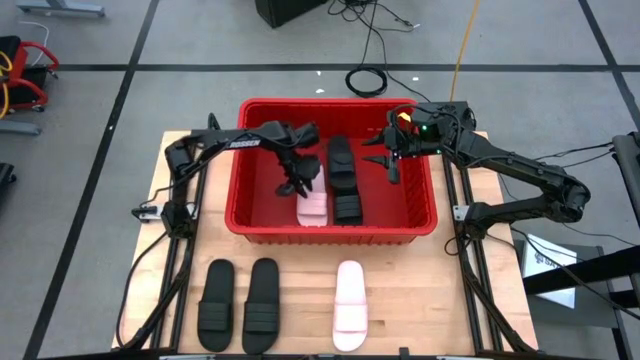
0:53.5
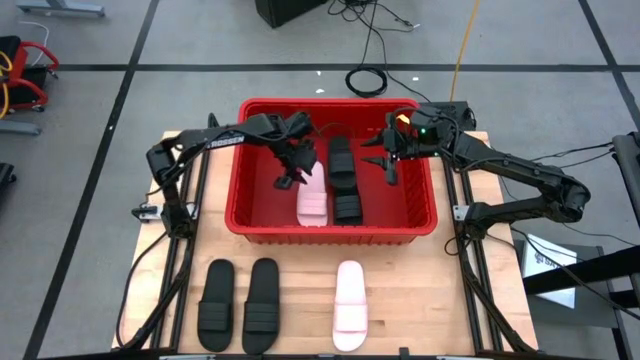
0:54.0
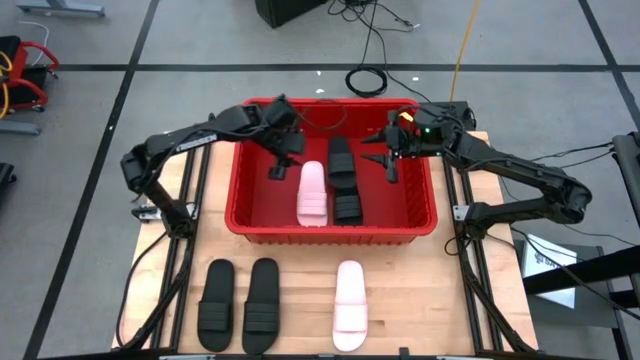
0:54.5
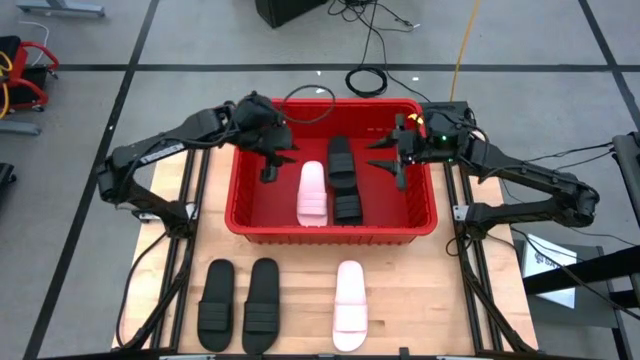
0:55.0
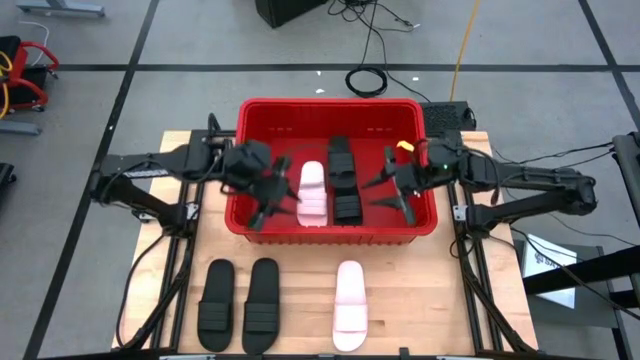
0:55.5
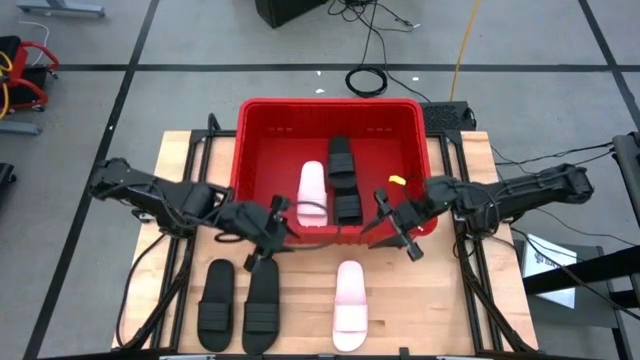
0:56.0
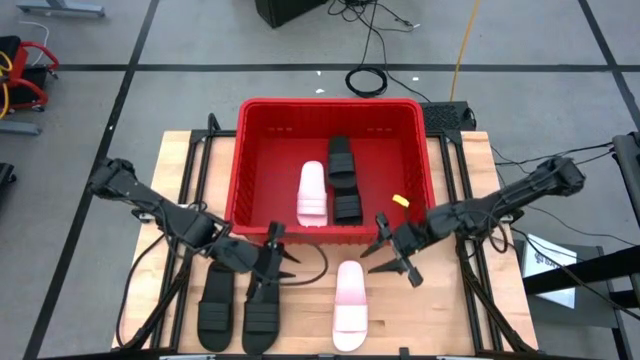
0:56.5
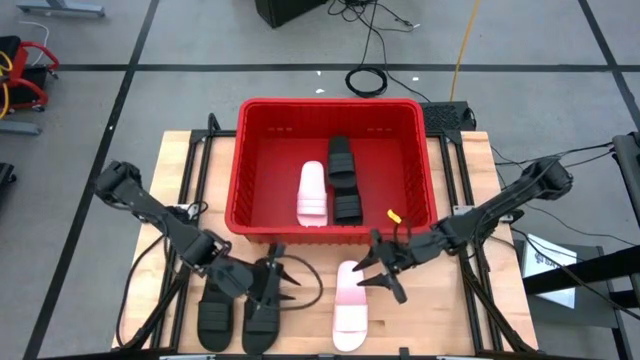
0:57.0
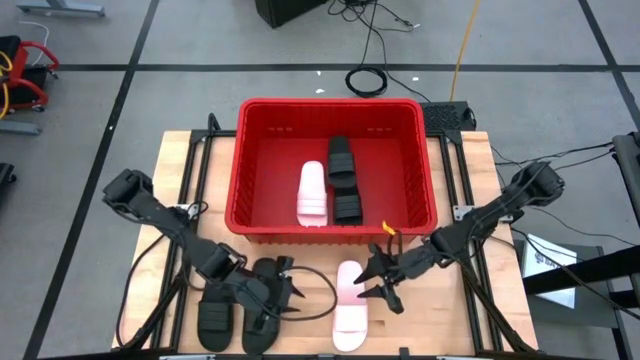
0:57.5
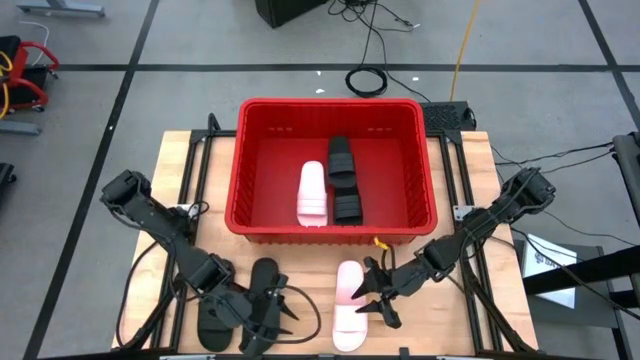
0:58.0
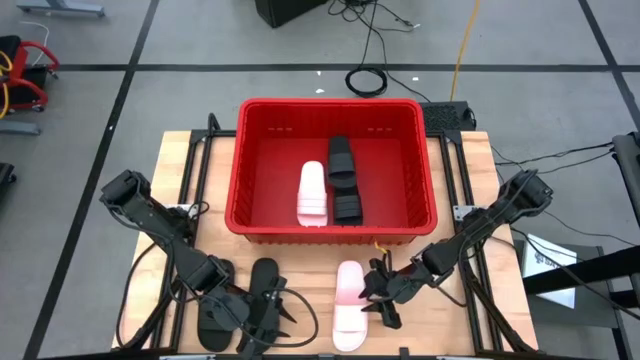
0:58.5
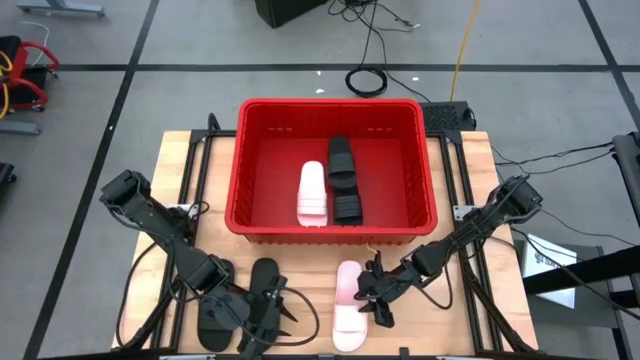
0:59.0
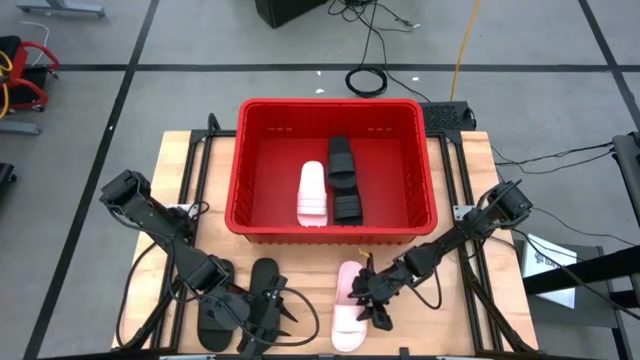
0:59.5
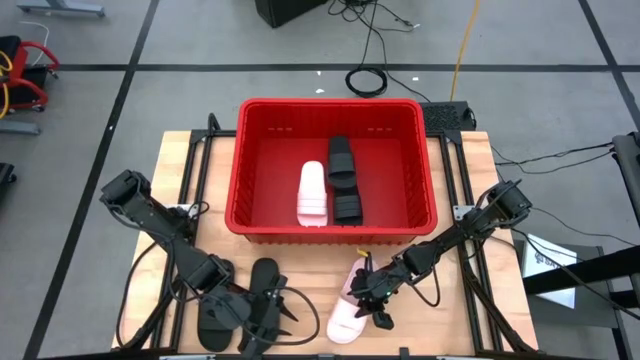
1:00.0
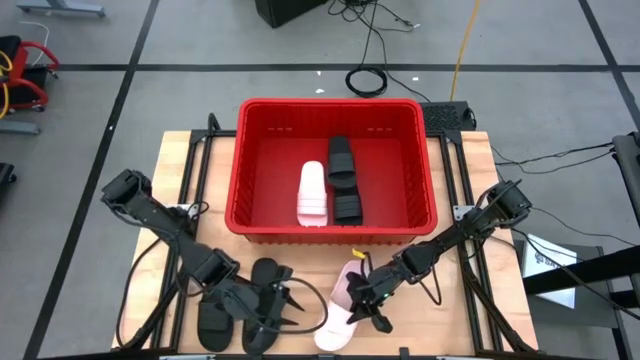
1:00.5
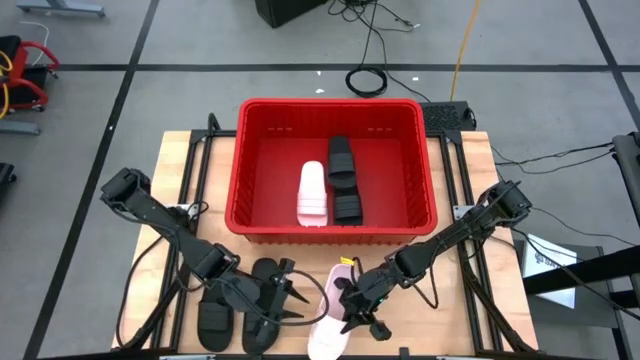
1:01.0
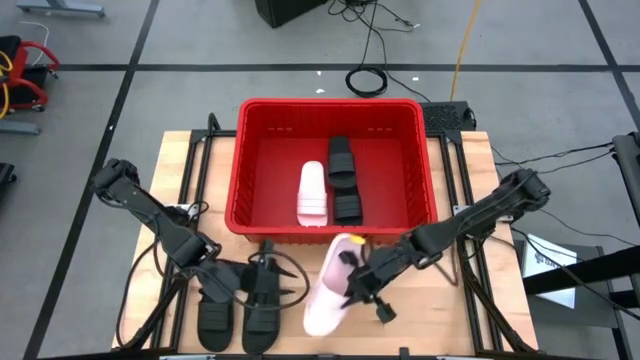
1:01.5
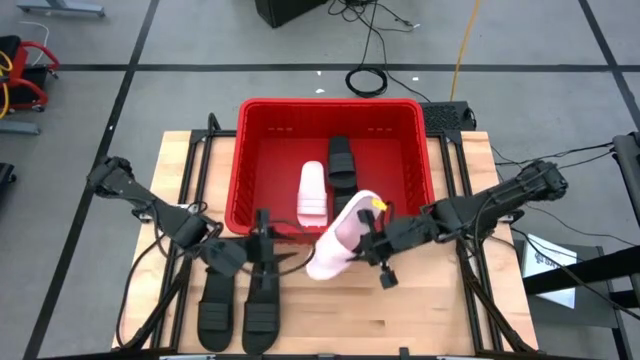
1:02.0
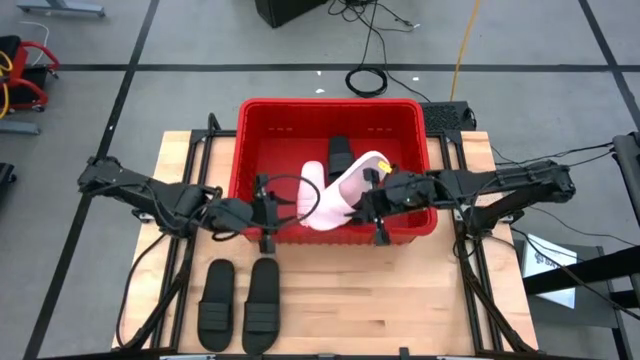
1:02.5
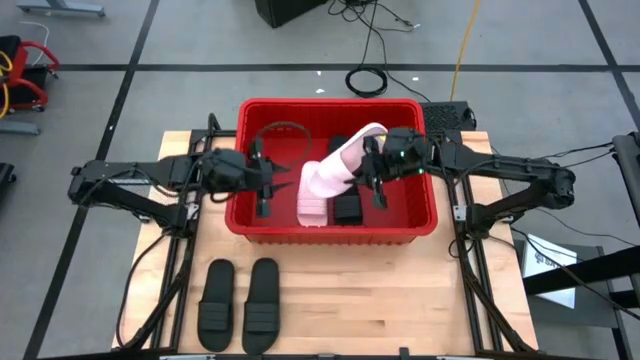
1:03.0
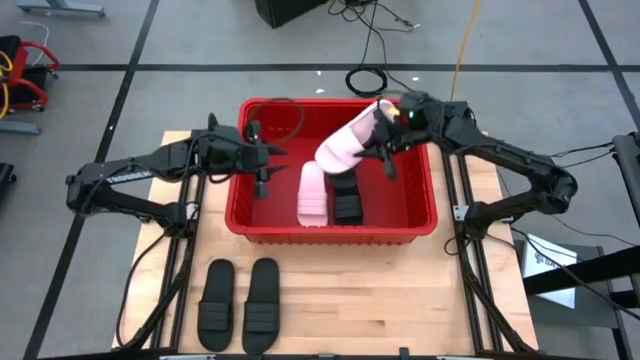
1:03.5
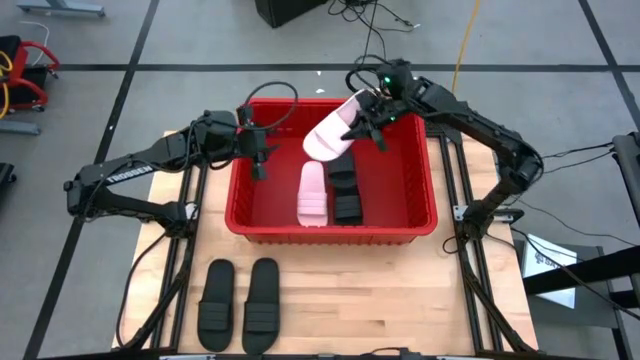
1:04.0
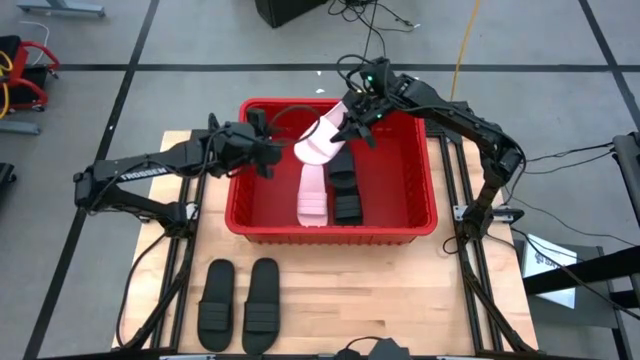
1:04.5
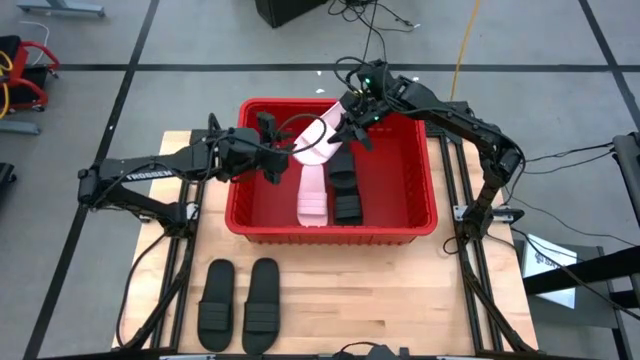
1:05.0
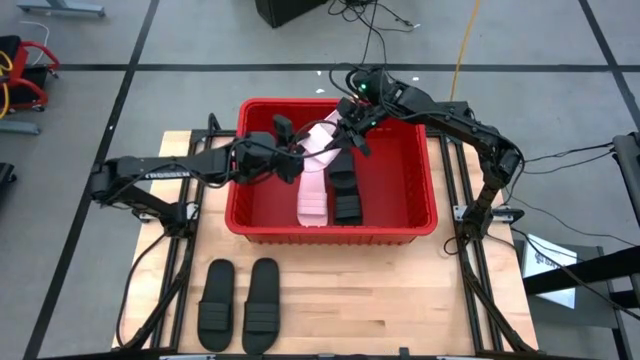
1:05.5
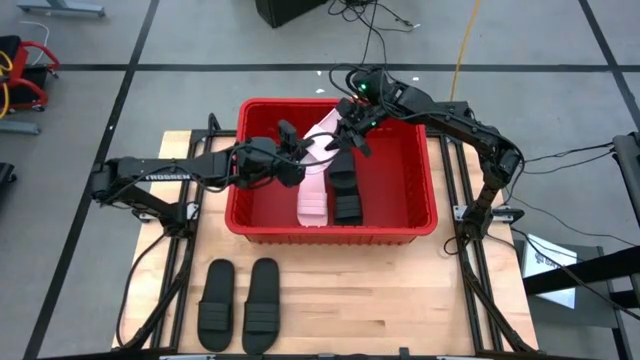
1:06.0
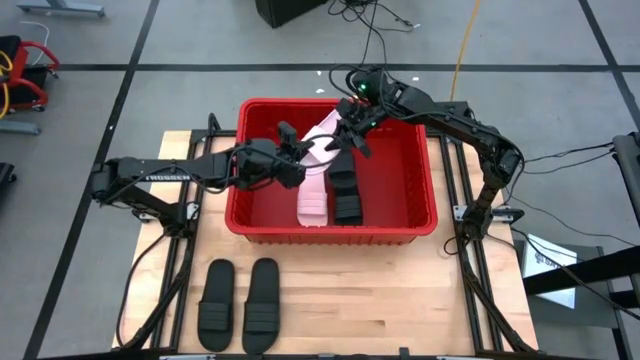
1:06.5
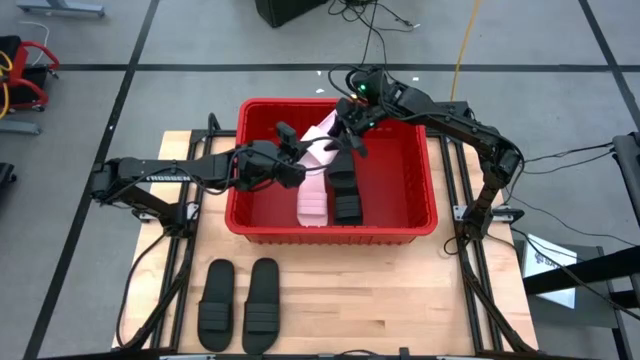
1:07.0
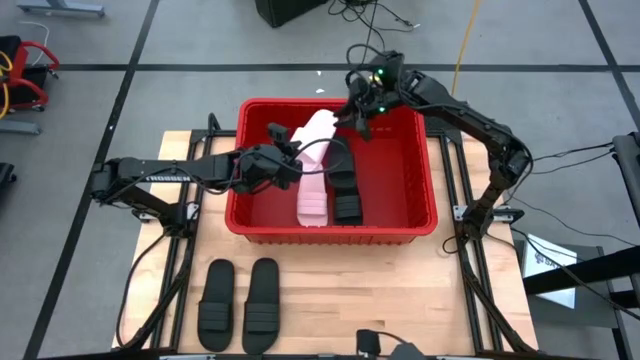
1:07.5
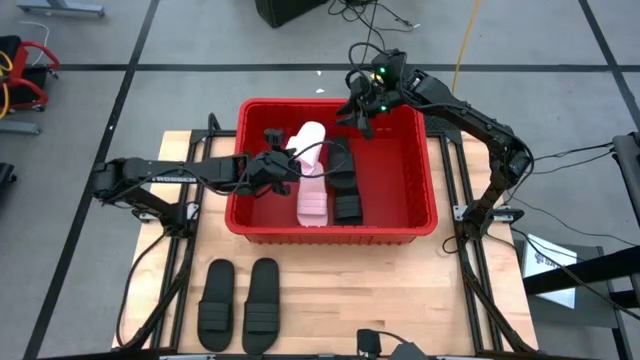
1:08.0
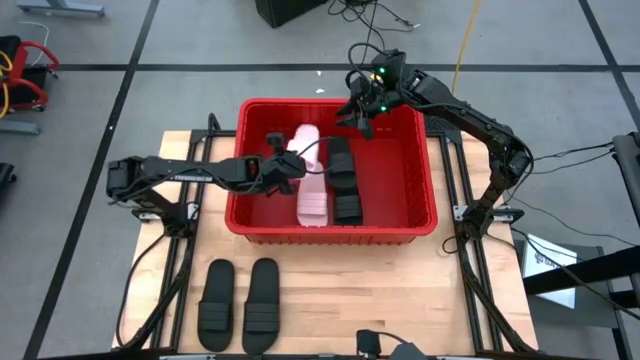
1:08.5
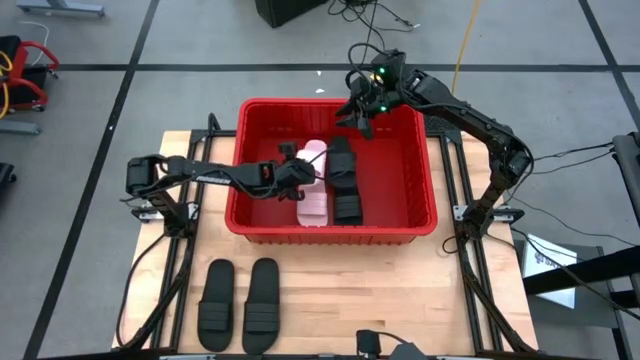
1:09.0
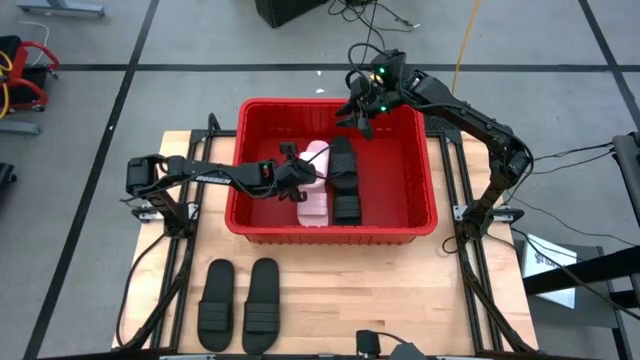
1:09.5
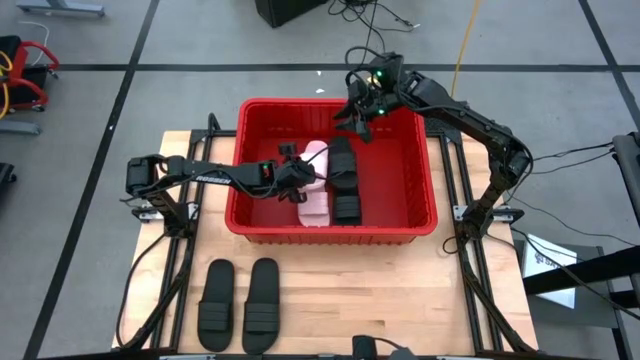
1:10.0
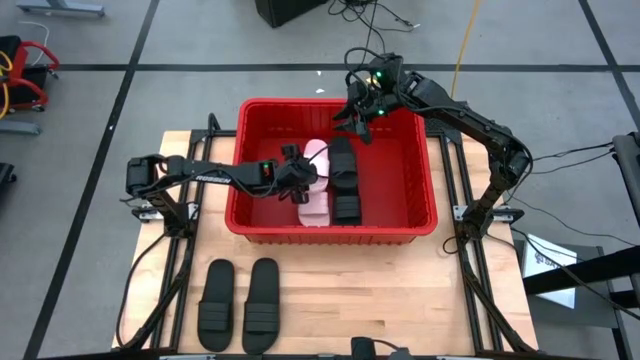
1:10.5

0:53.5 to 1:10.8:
Task: Pick and place slides into bin
Put the pink slide into the red bin

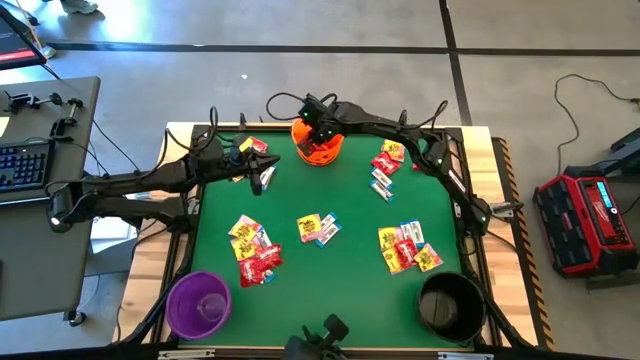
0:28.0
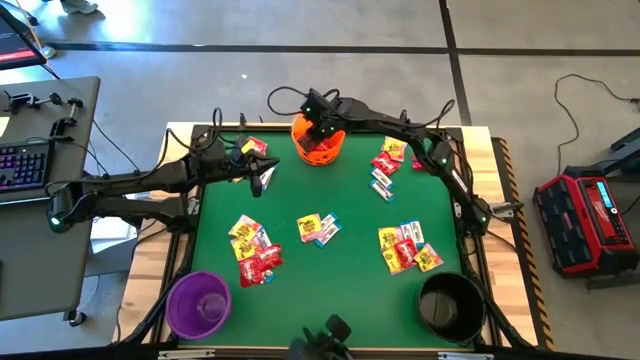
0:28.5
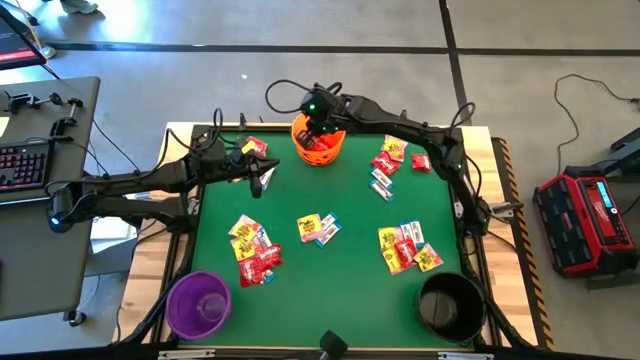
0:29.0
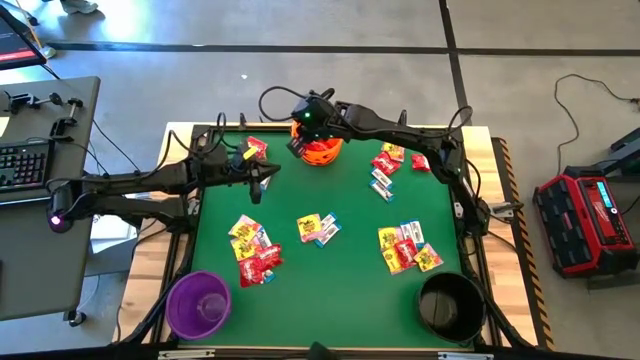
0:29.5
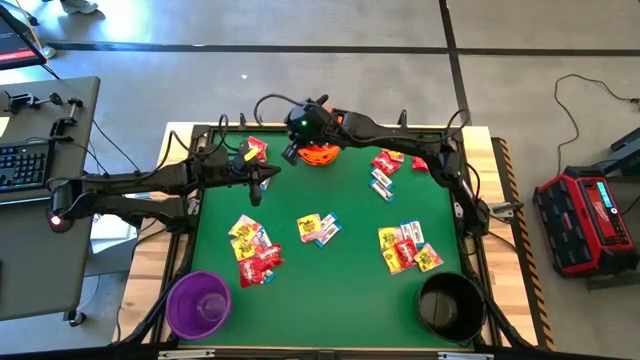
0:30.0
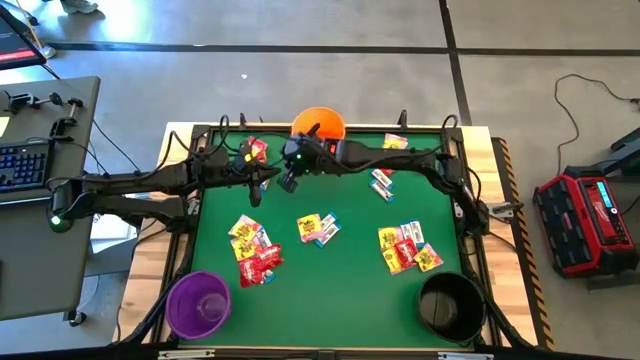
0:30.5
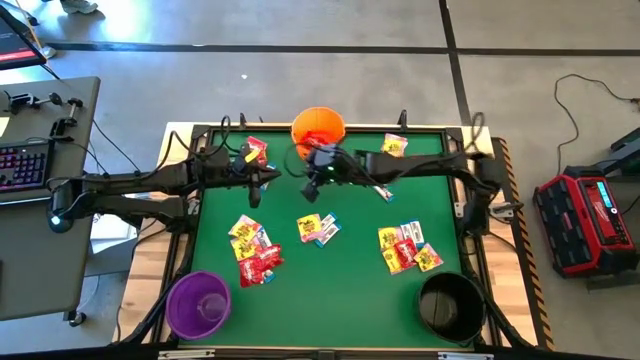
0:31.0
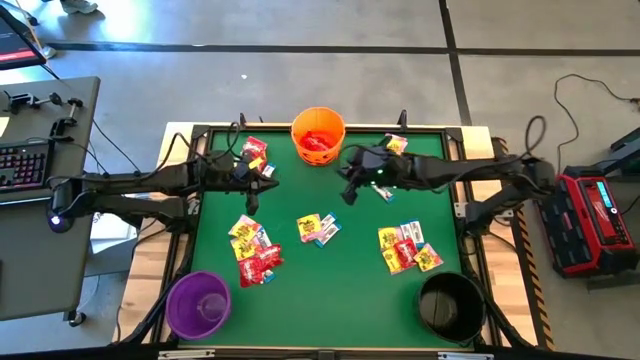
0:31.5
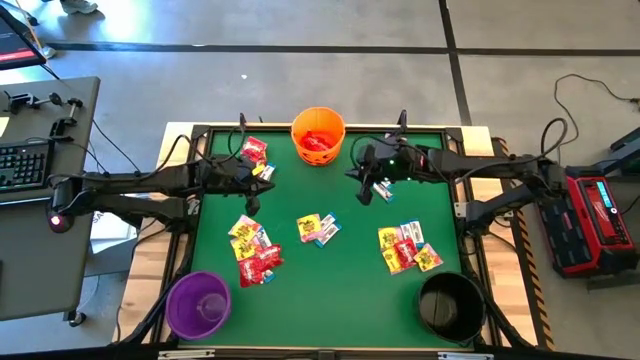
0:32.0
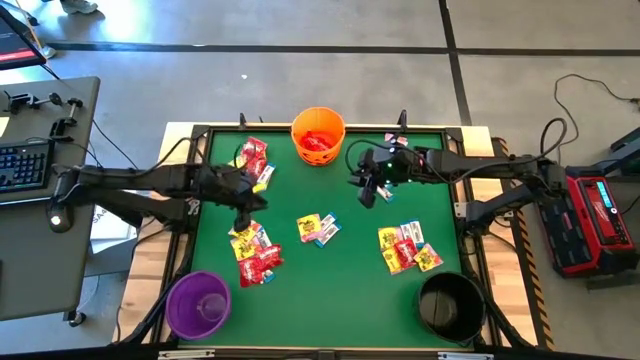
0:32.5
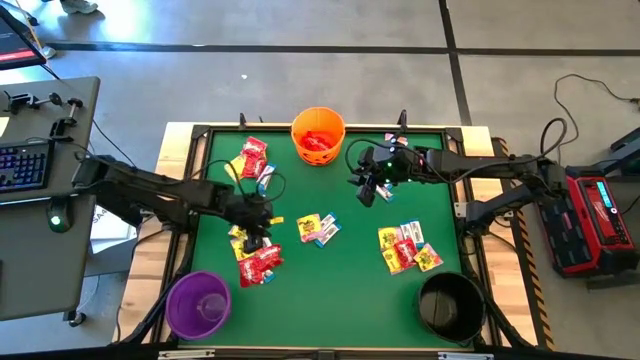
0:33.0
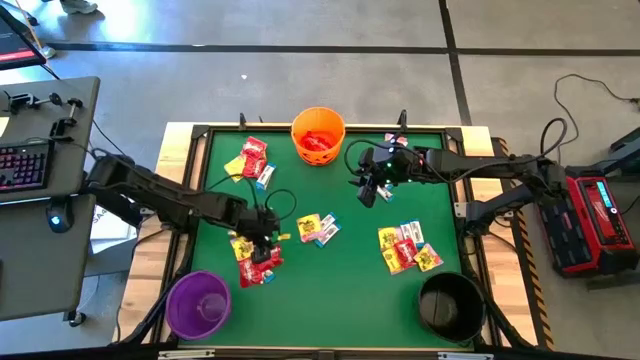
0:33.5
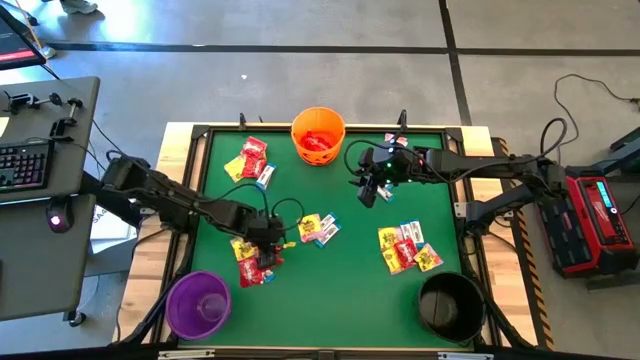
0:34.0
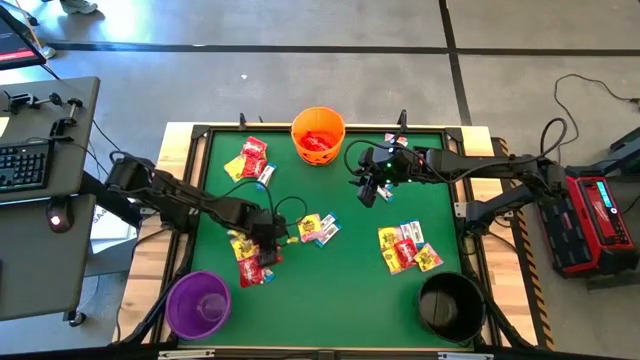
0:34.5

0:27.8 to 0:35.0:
Task: Sort candy by brand, put in halloween buckets
Put the red candy into the orange bucket
